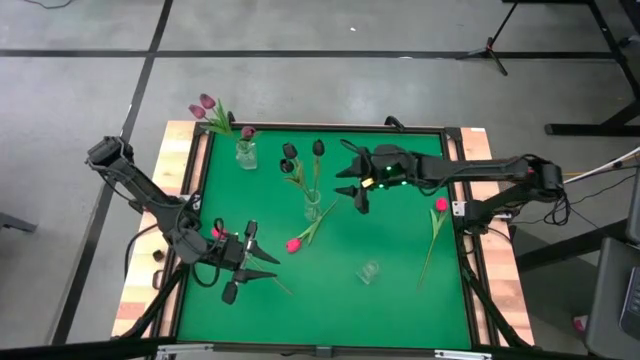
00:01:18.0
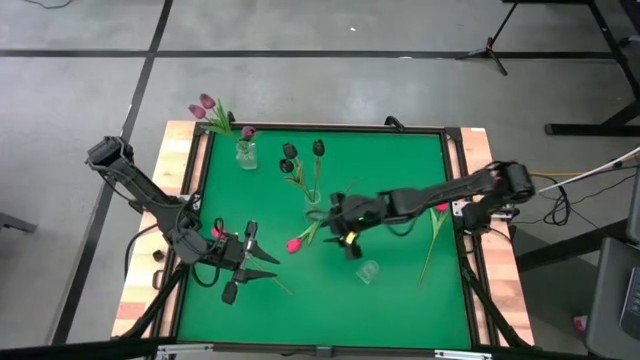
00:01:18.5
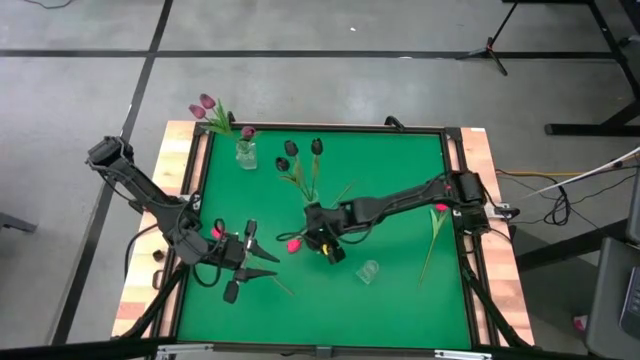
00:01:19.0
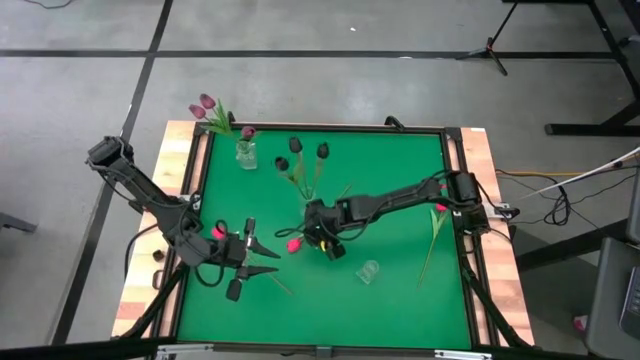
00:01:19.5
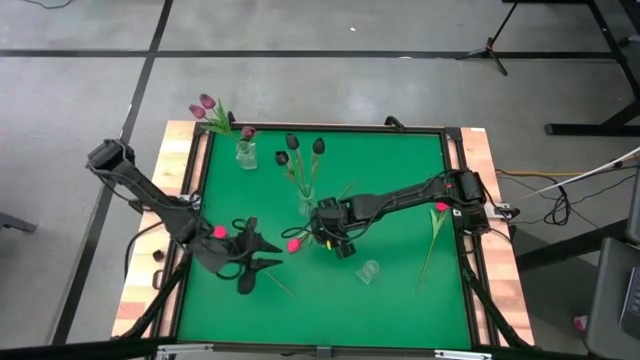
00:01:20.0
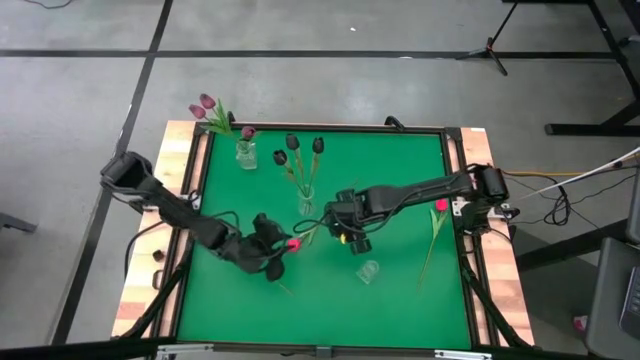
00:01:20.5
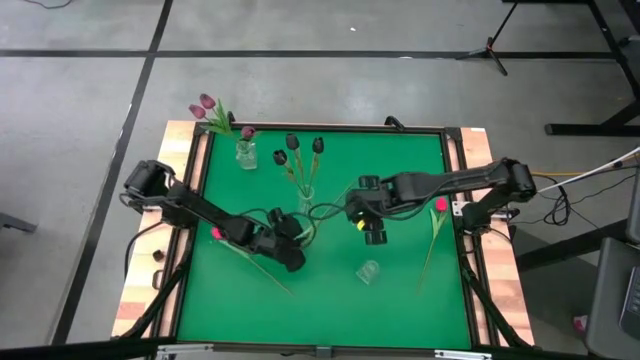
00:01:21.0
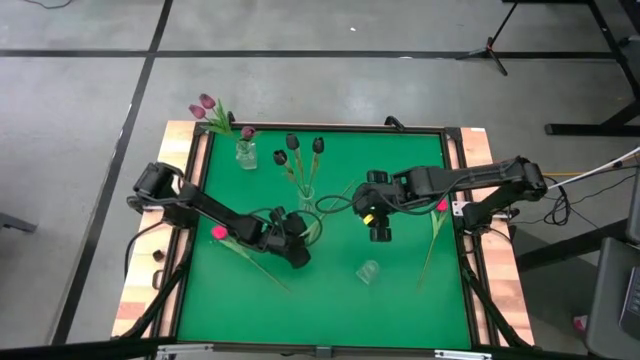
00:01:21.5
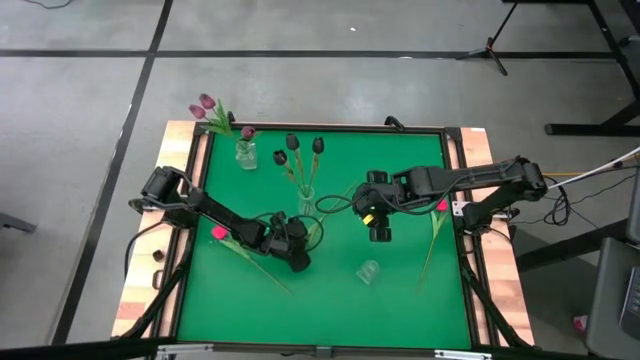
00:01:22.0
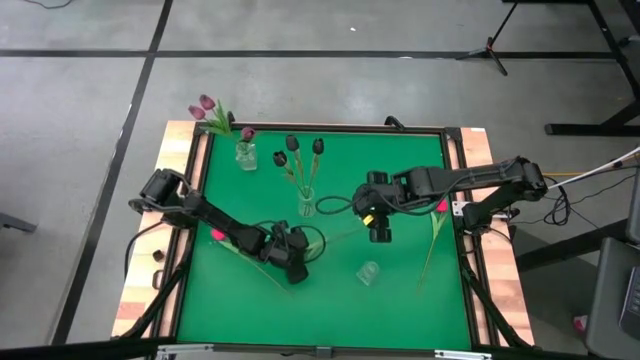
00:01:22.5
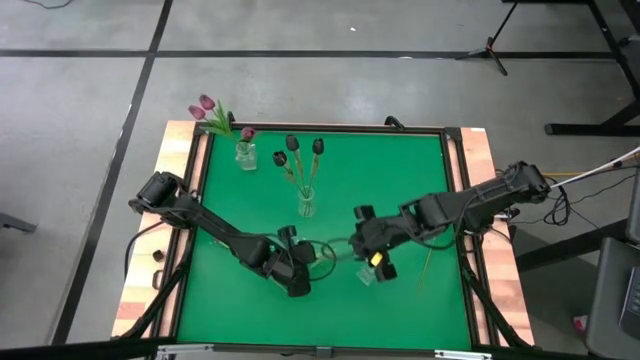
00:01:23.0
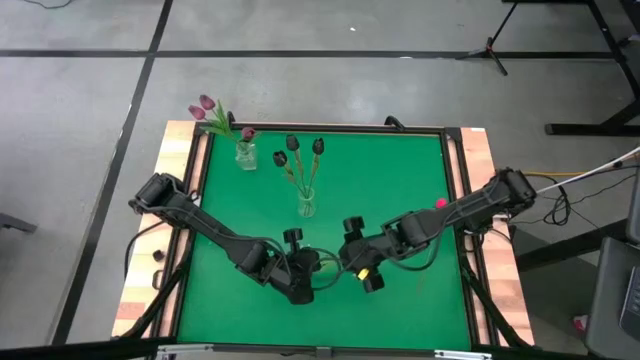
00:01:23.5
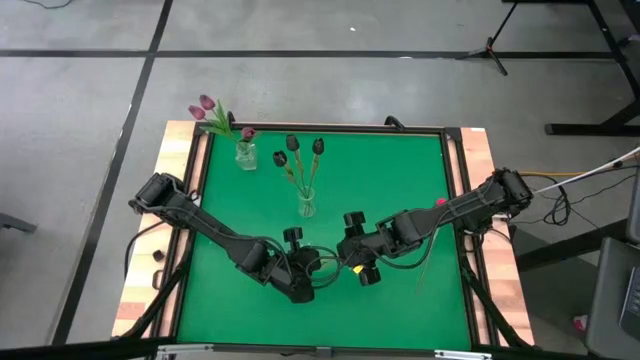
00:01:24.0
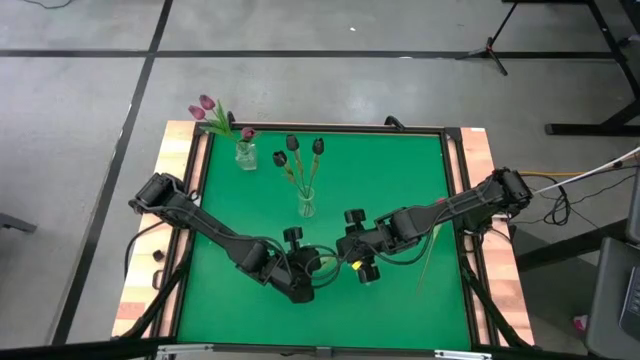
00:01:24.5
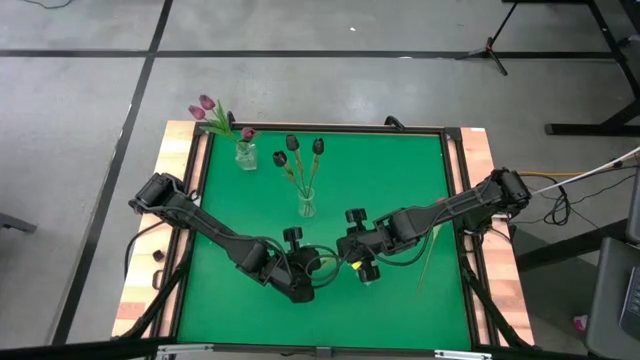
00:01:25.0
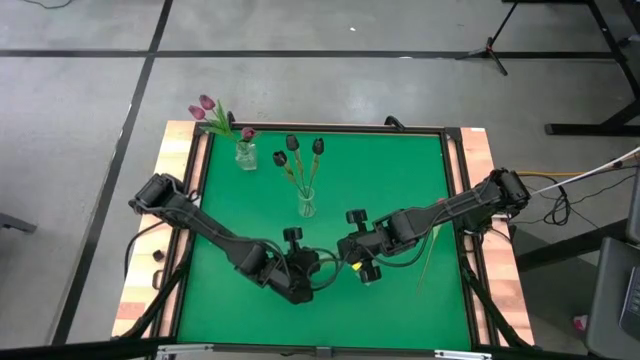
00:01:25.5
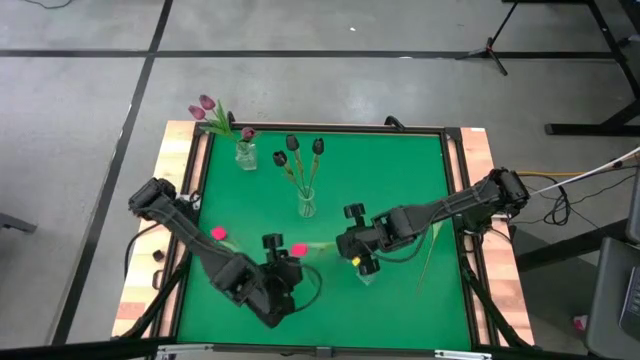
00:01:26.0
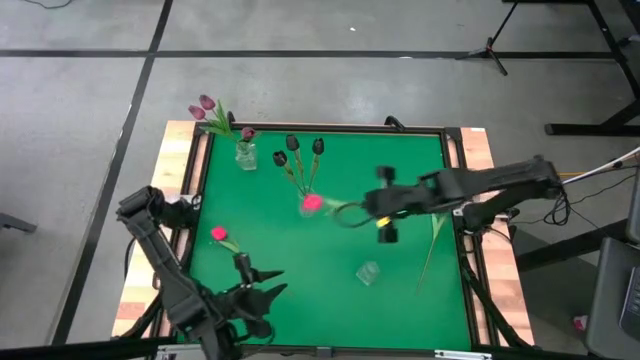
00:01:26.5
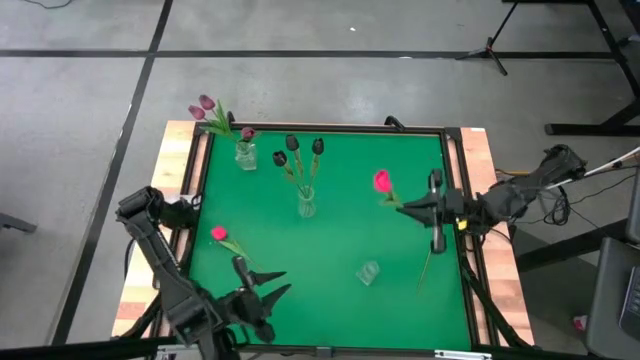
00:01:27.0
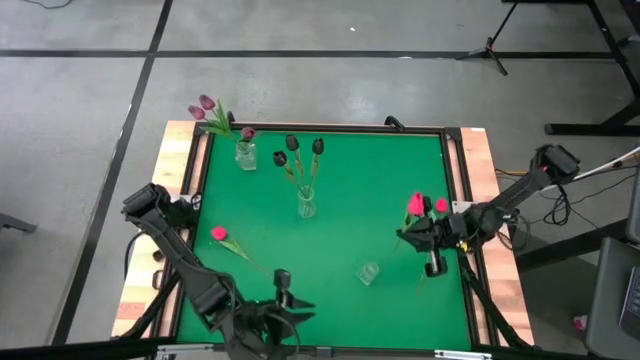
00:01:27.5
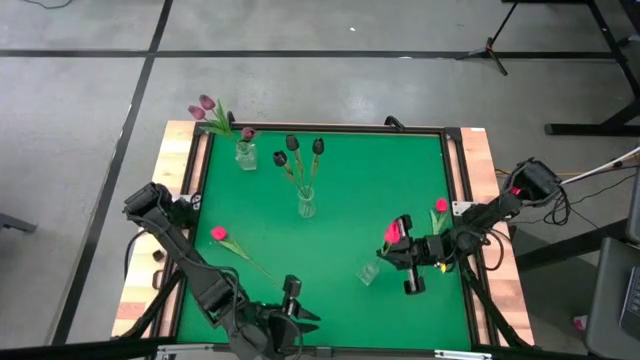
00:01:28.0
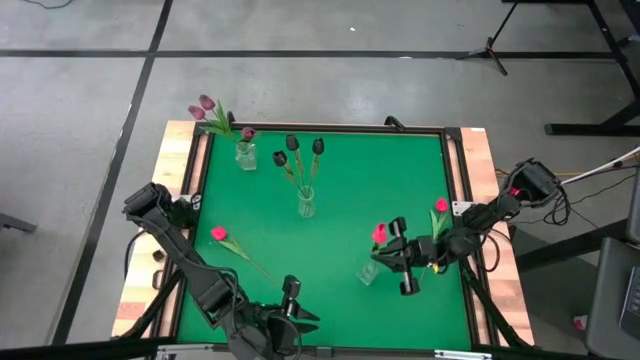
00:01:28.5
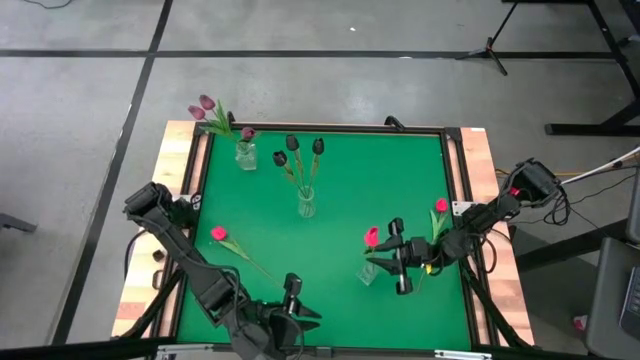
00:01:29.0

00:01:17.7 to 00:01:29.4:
Task: Sort flowers into vase by color
Put the center pink tulip into the bottom transparent vase

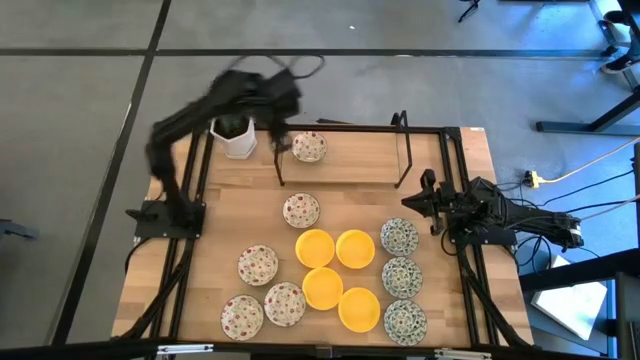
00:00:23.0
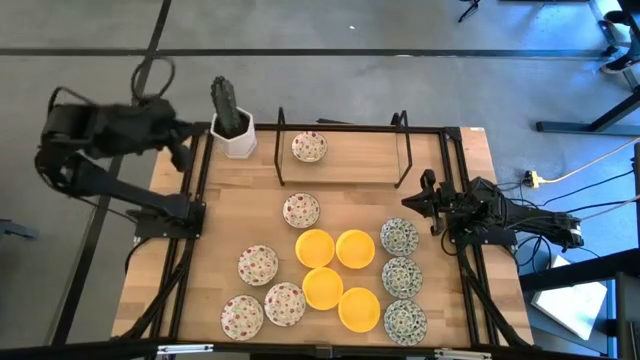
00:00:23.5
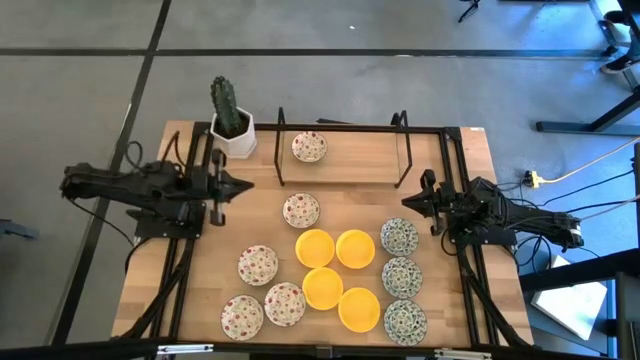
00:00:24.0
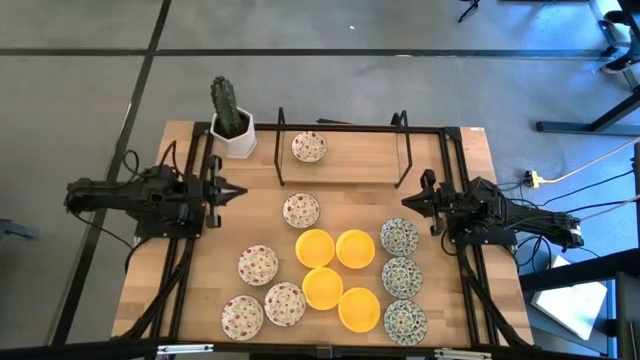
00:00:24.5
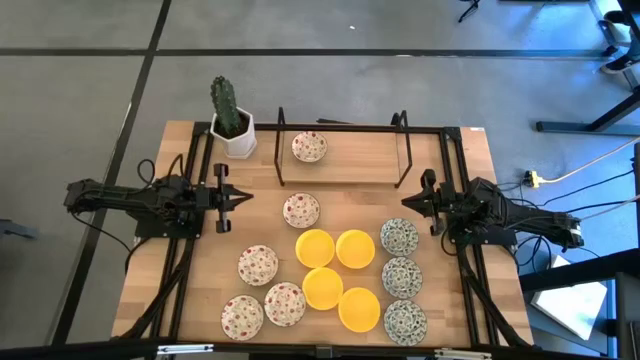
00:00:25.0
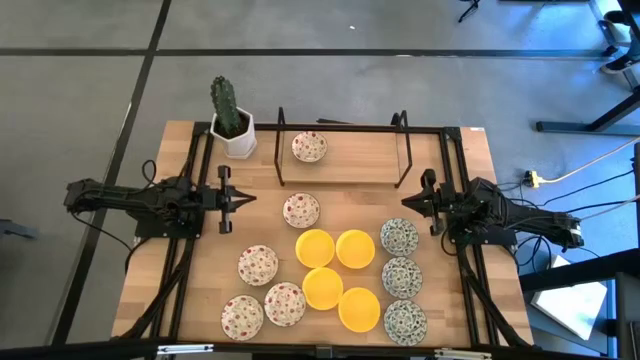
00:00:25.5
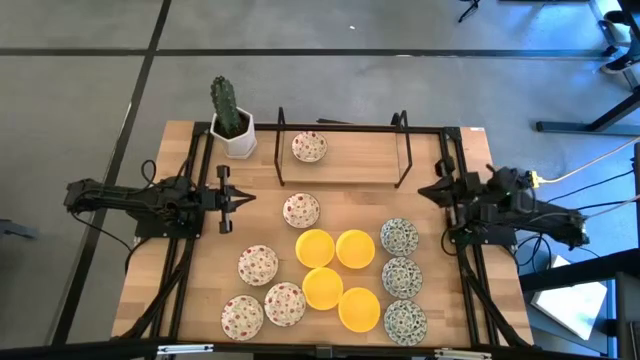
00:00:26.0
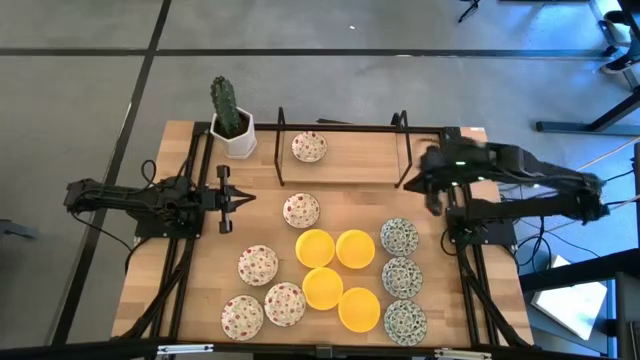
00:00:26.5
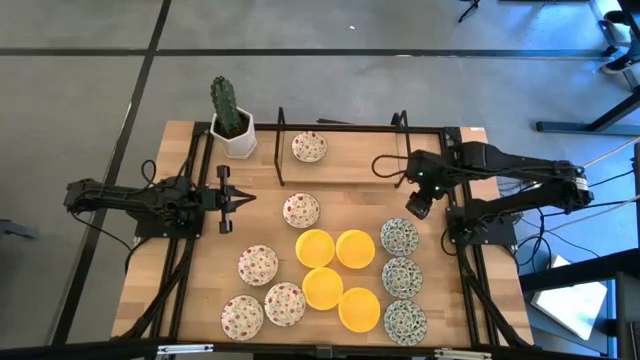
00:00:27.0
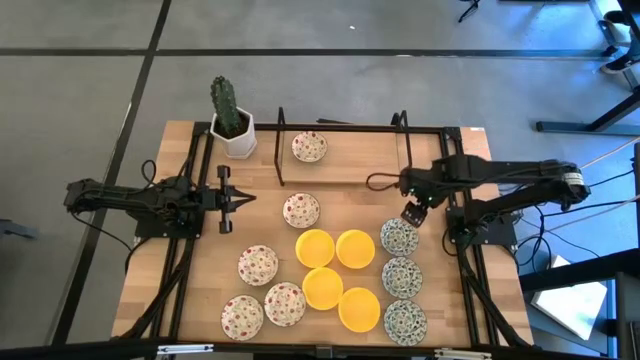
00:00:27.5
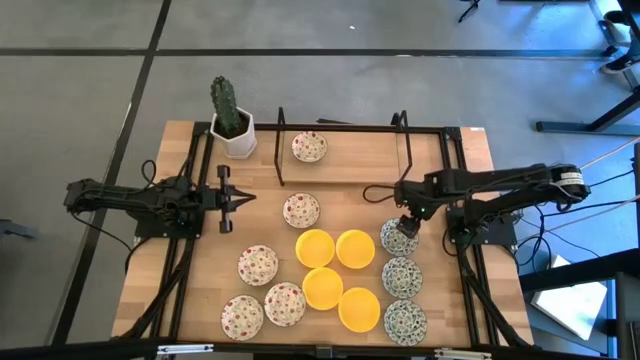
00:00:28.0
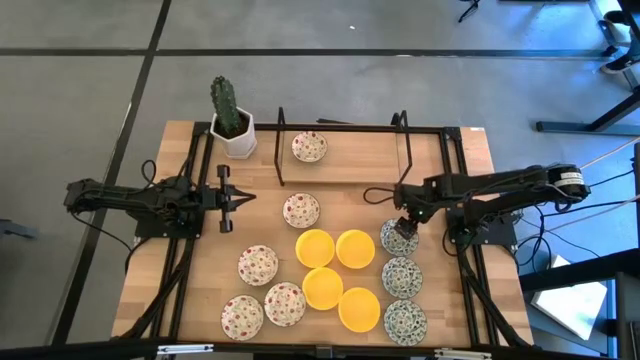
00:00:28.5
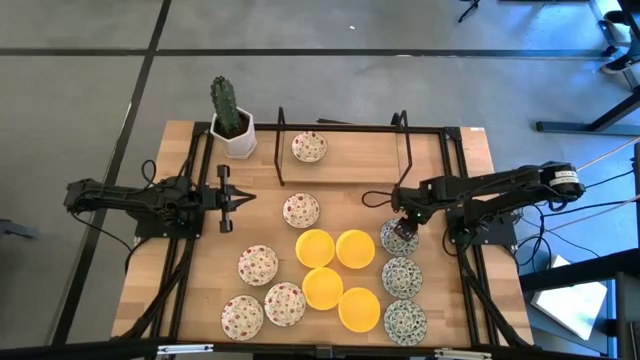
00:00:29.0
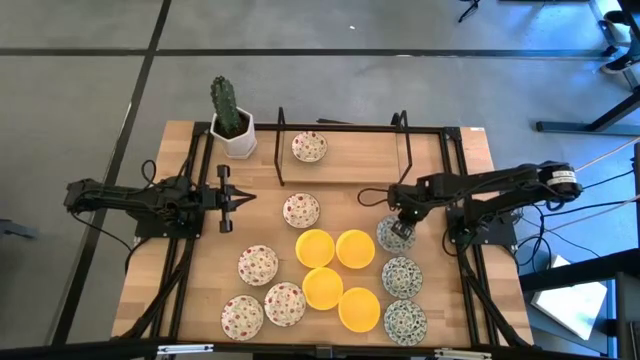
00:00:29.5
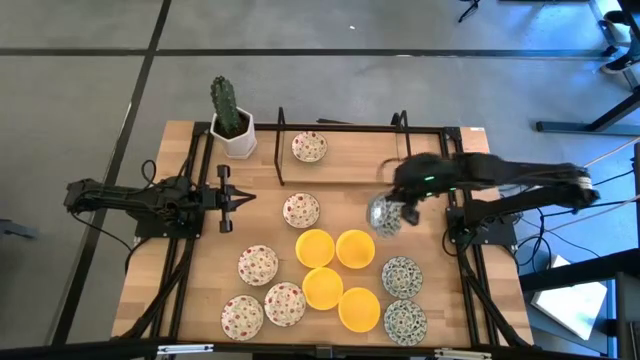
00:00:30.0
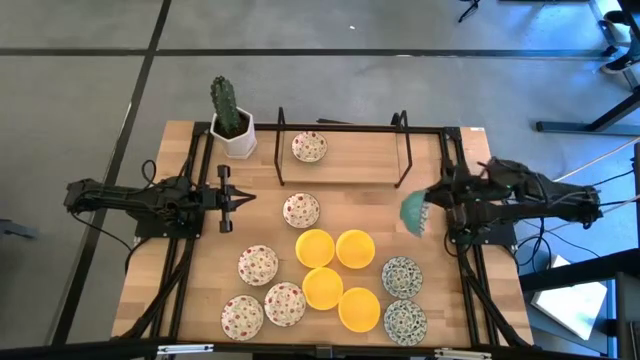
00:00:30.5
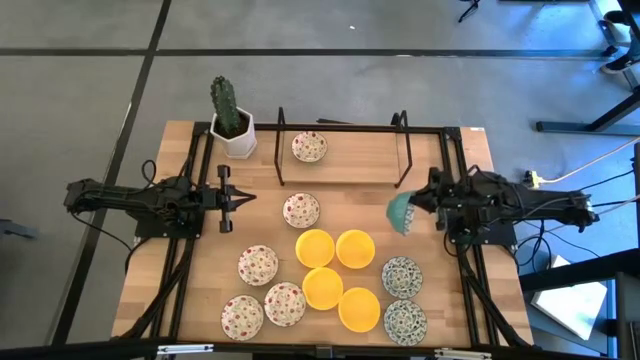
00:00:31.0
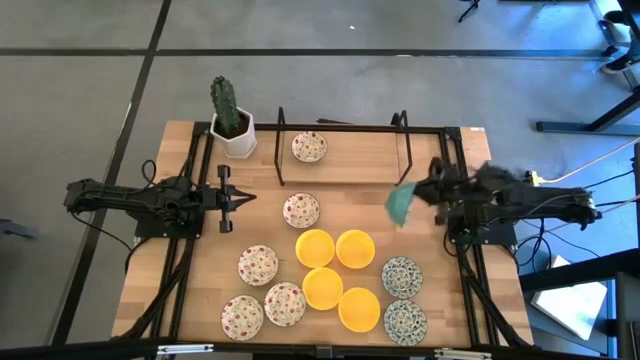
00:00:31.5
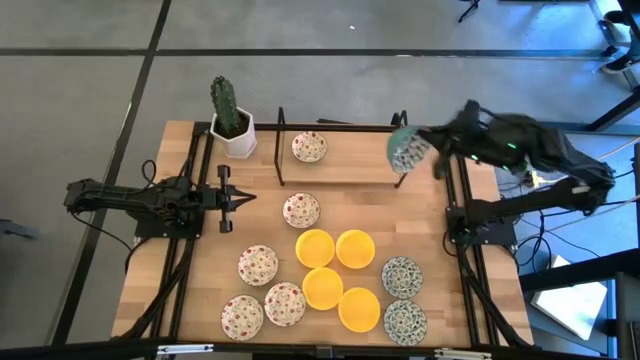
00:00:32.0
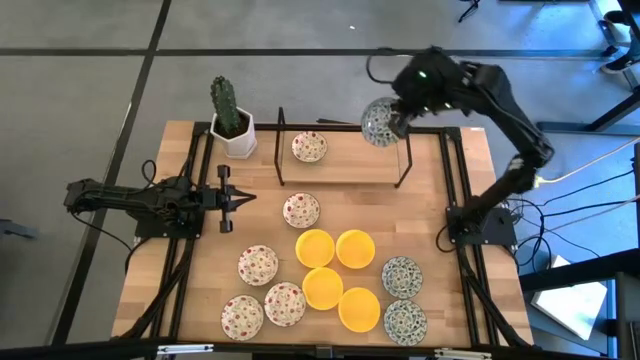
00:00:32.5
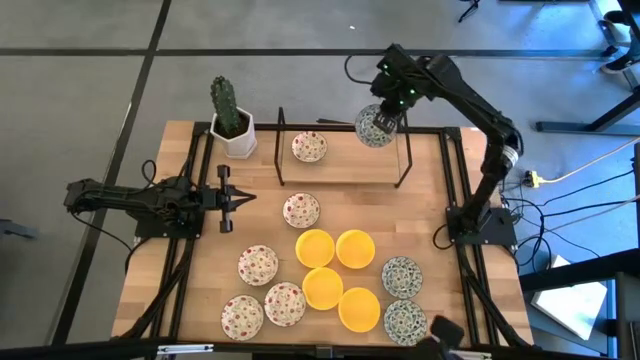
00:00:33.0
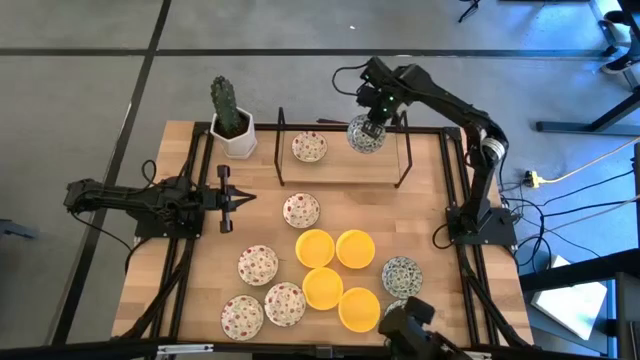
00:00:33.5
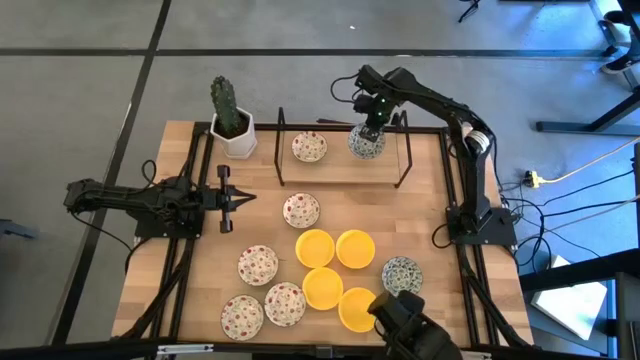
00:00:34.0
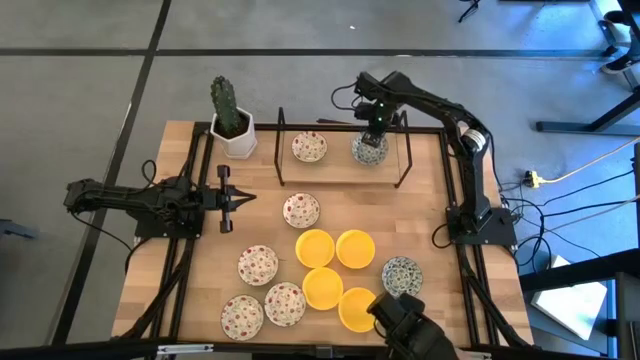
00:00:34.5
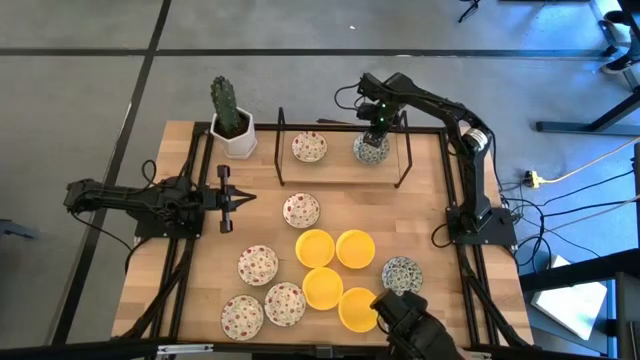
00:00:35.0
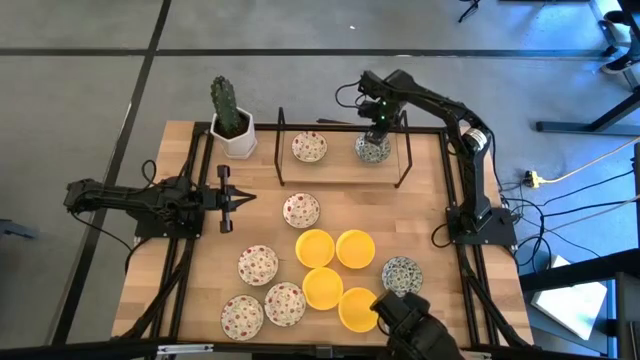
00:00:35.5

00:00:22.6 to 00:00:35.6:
Task: Pick & Place Mini bowls
Put the white blue patterned bowl on the shelf
